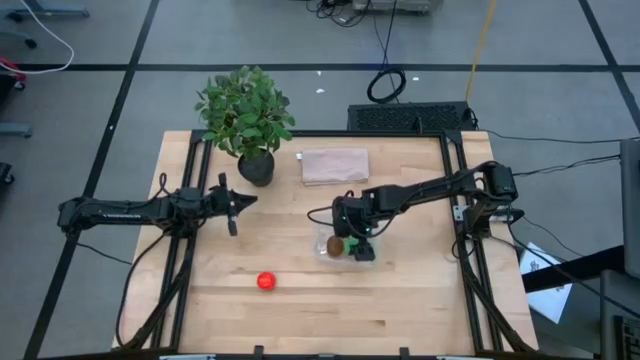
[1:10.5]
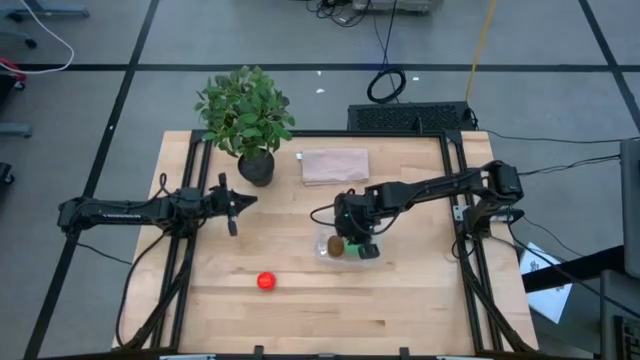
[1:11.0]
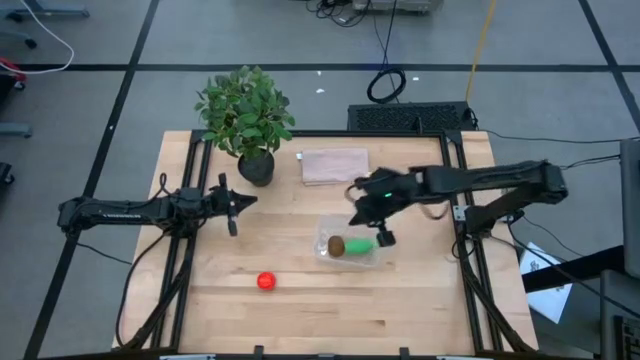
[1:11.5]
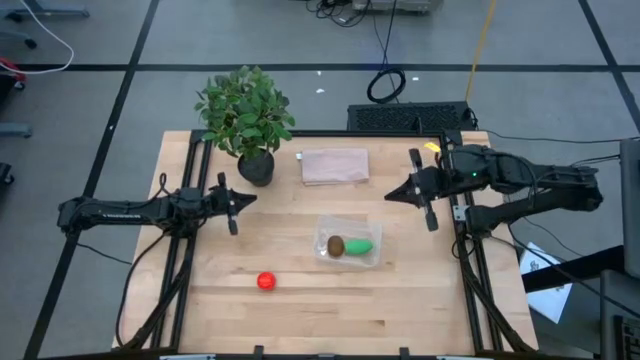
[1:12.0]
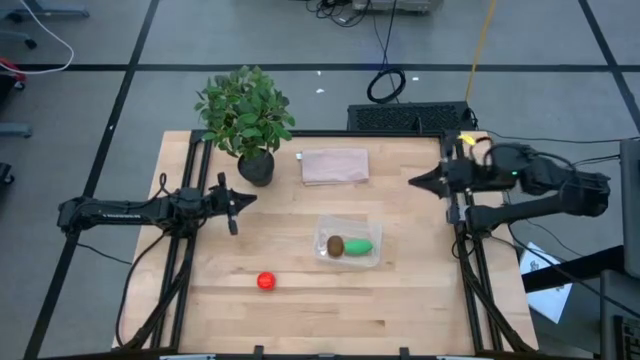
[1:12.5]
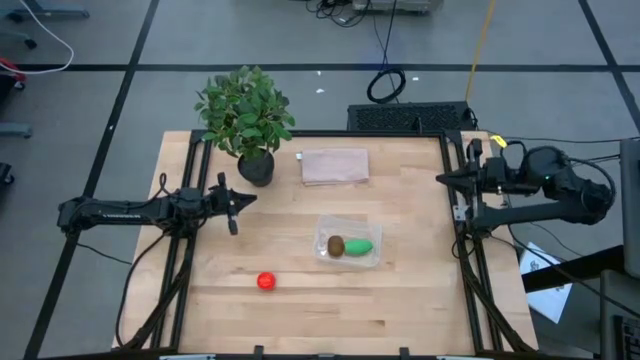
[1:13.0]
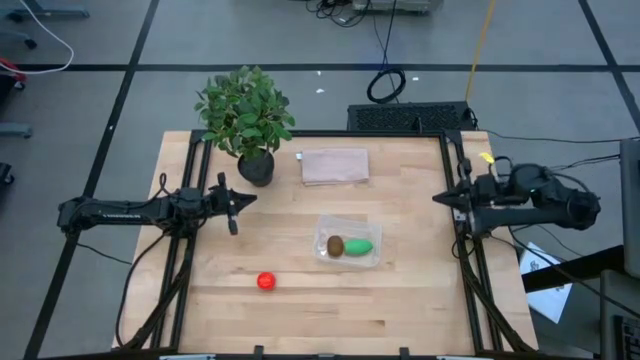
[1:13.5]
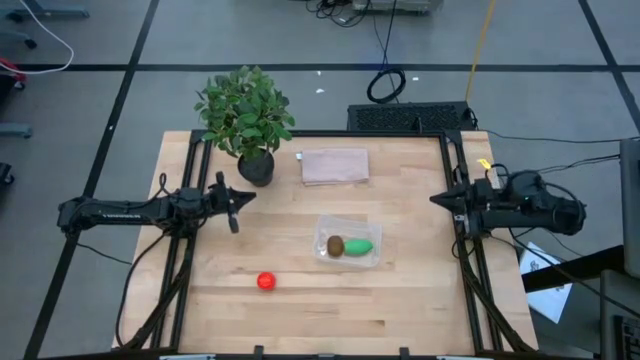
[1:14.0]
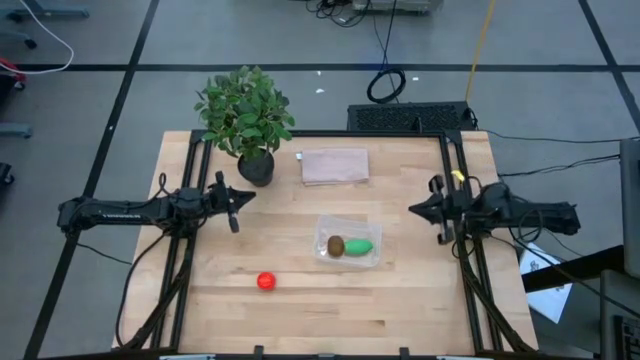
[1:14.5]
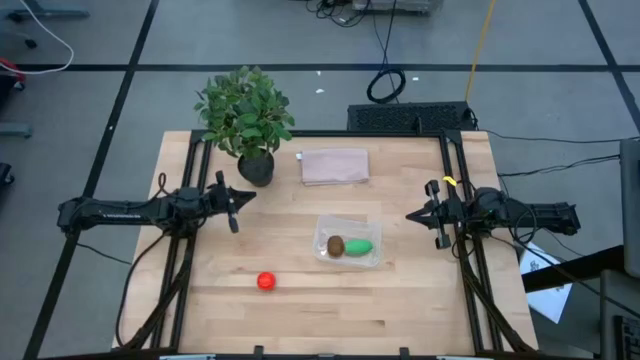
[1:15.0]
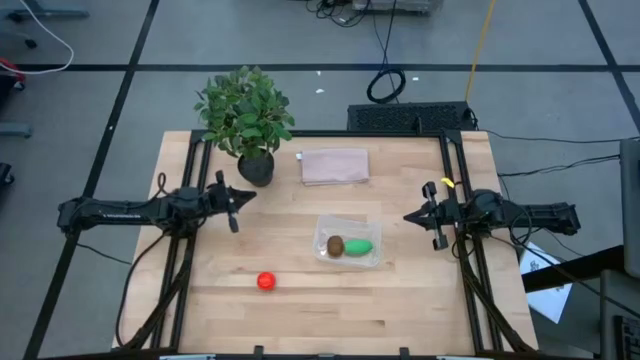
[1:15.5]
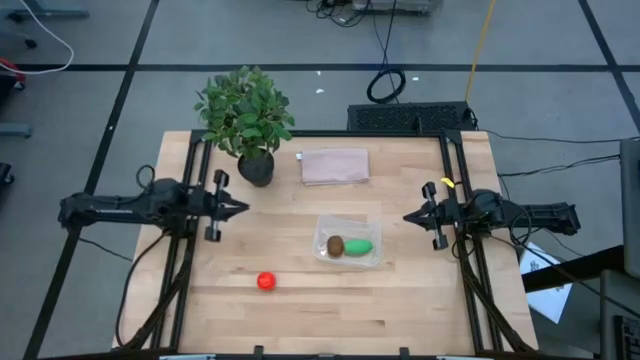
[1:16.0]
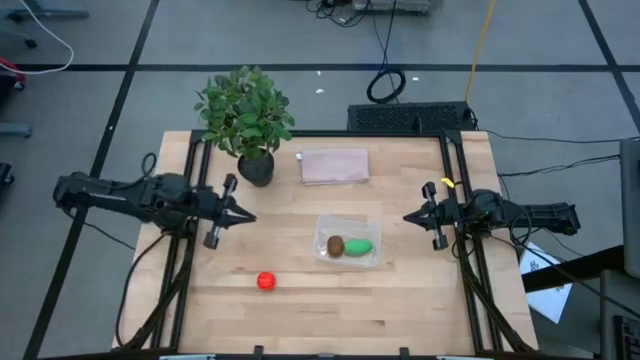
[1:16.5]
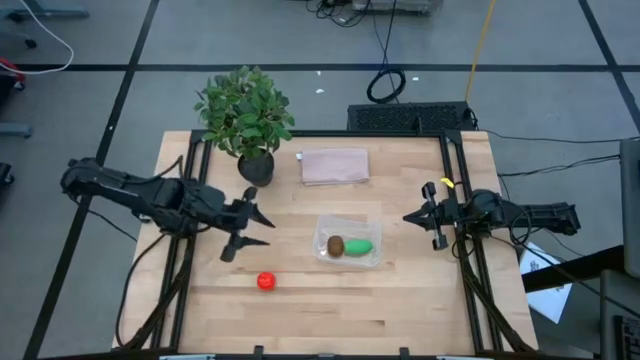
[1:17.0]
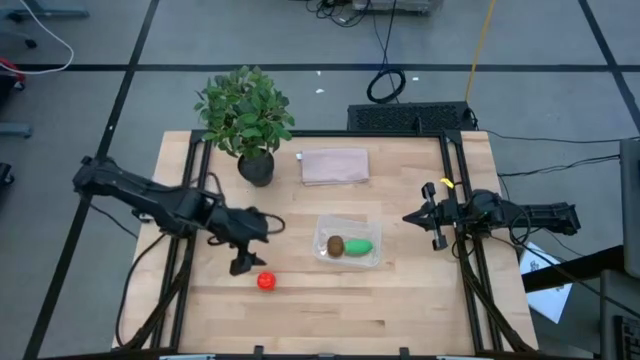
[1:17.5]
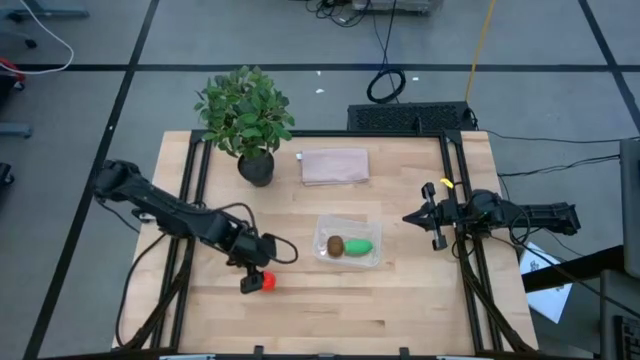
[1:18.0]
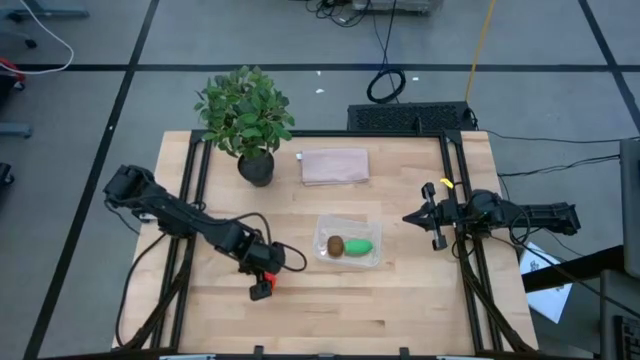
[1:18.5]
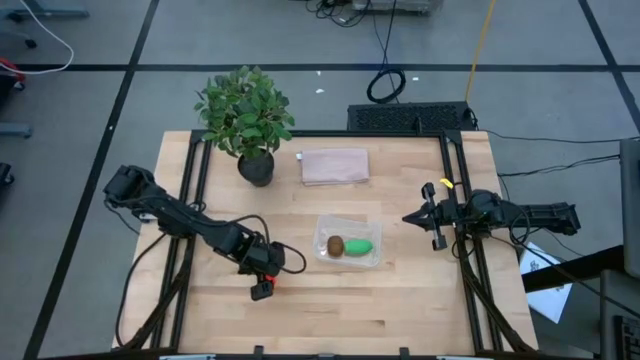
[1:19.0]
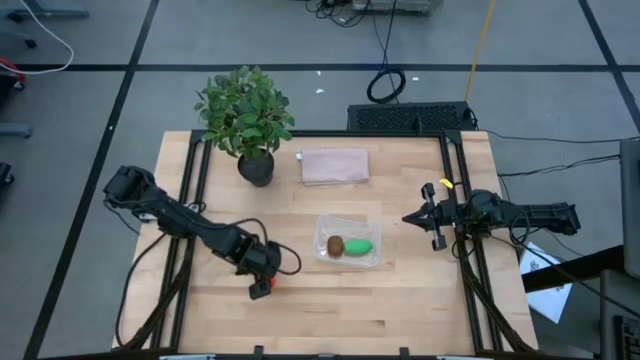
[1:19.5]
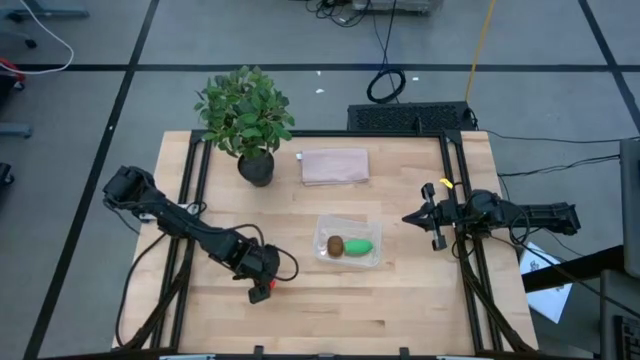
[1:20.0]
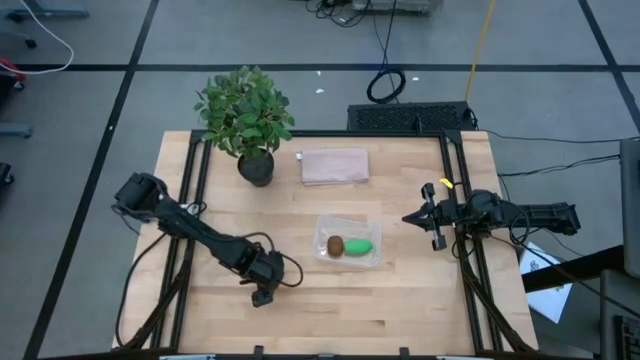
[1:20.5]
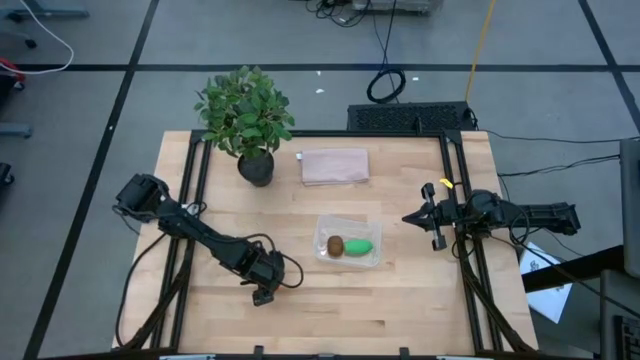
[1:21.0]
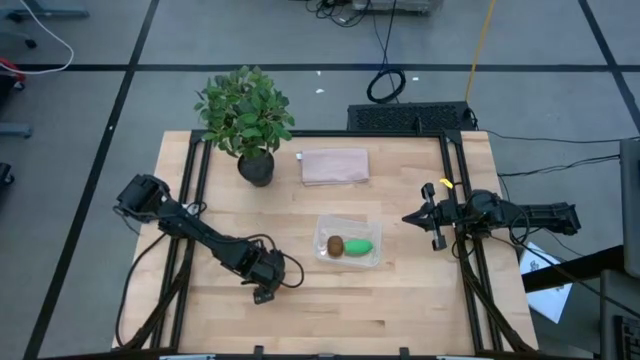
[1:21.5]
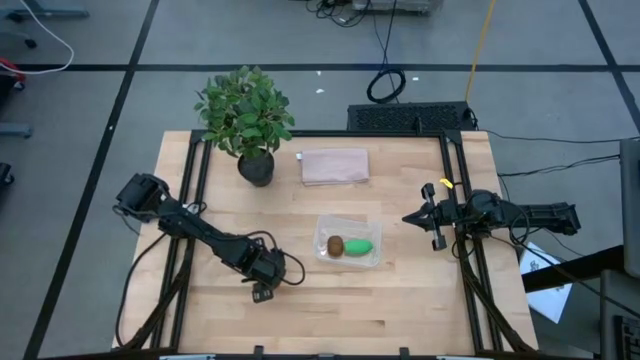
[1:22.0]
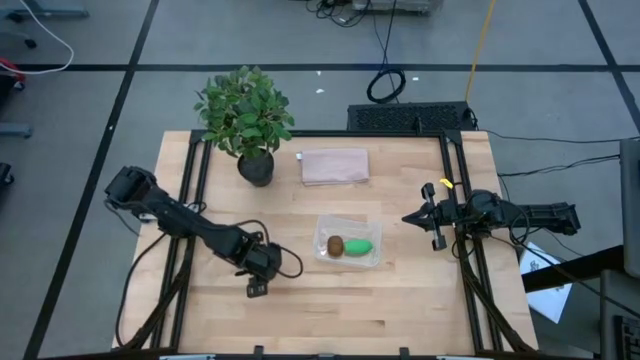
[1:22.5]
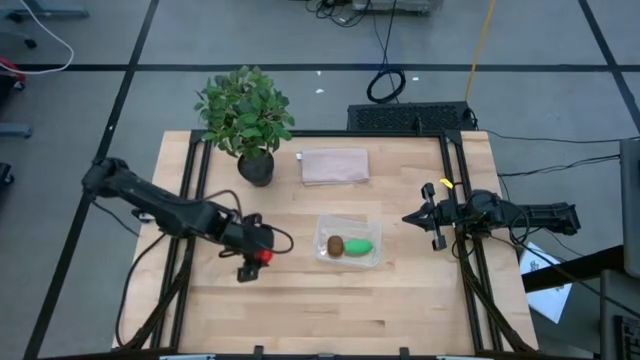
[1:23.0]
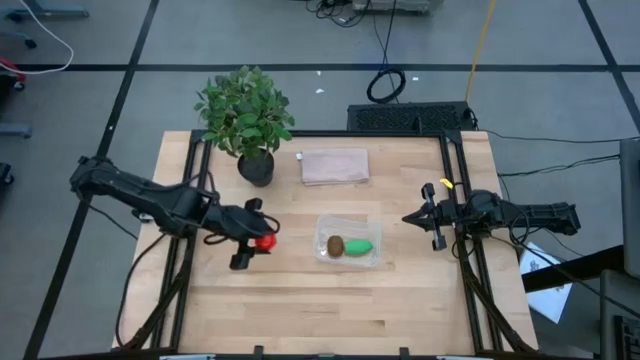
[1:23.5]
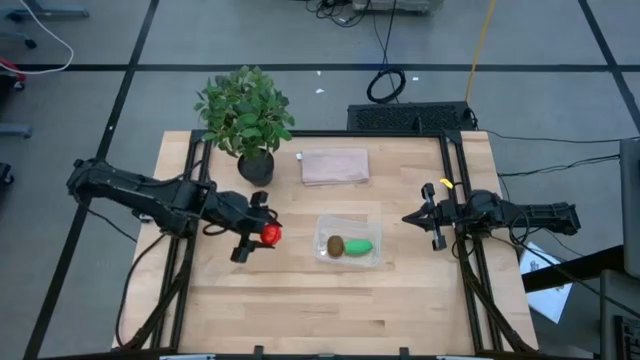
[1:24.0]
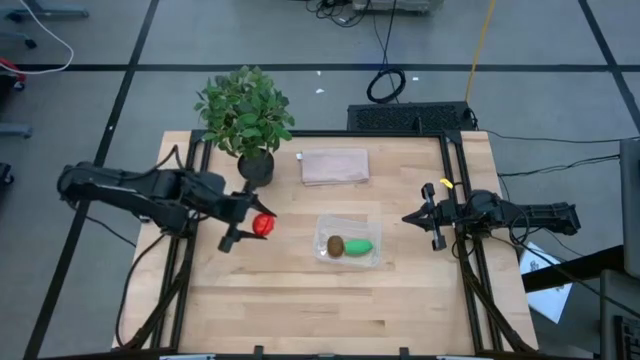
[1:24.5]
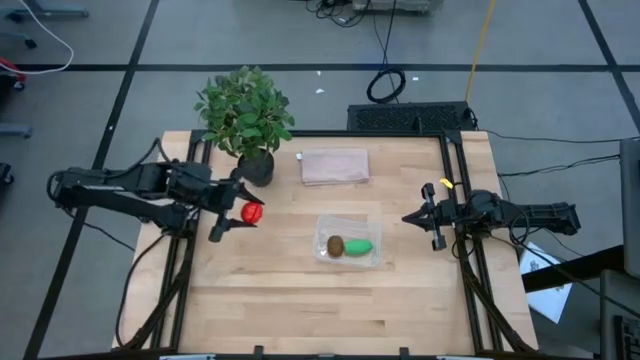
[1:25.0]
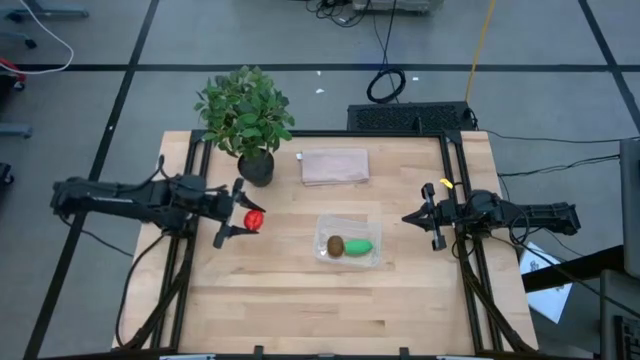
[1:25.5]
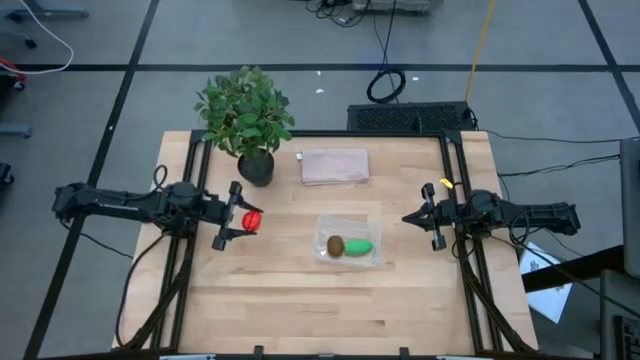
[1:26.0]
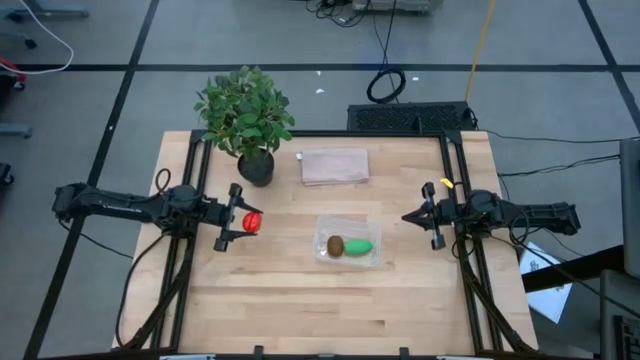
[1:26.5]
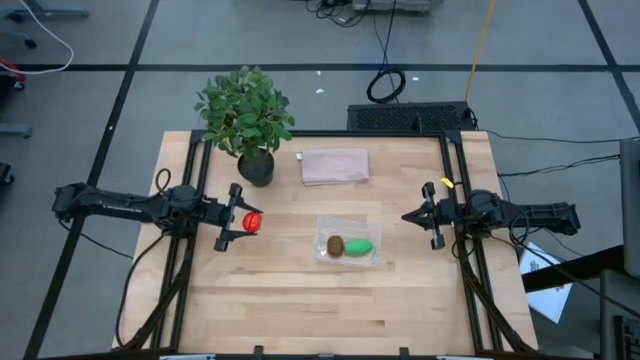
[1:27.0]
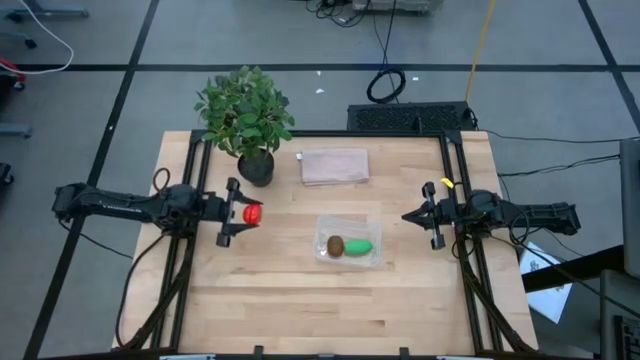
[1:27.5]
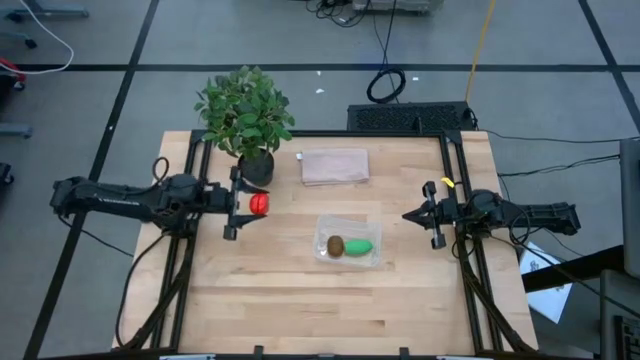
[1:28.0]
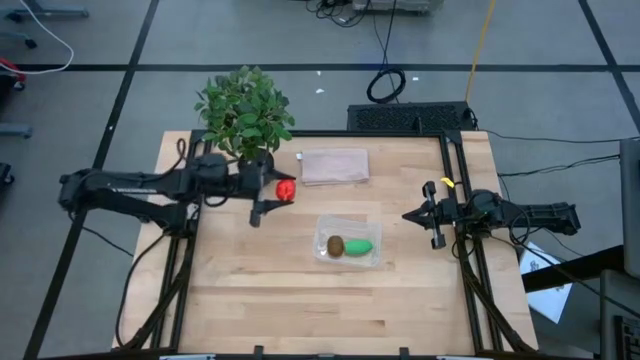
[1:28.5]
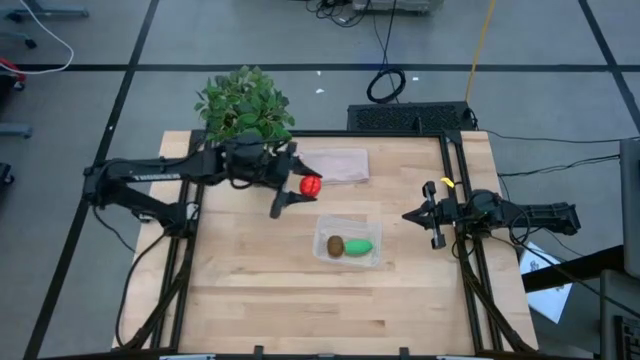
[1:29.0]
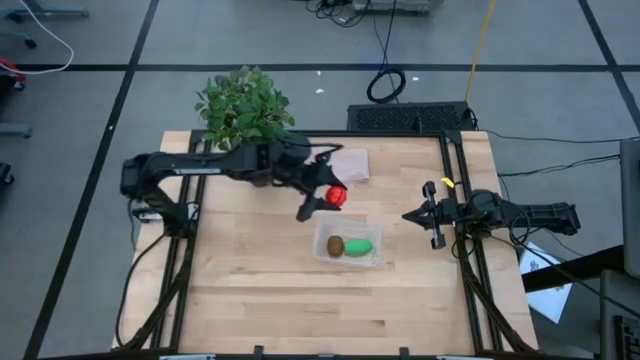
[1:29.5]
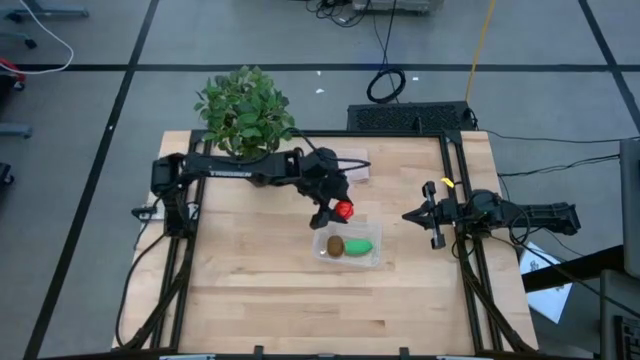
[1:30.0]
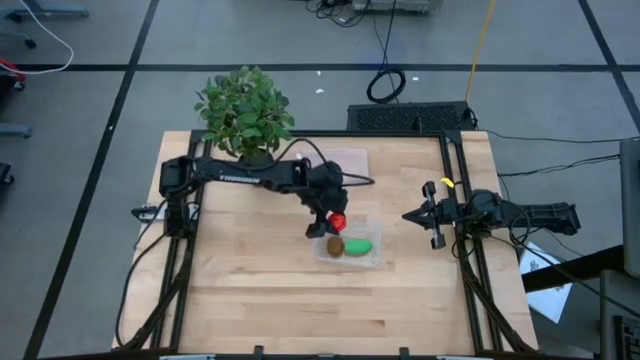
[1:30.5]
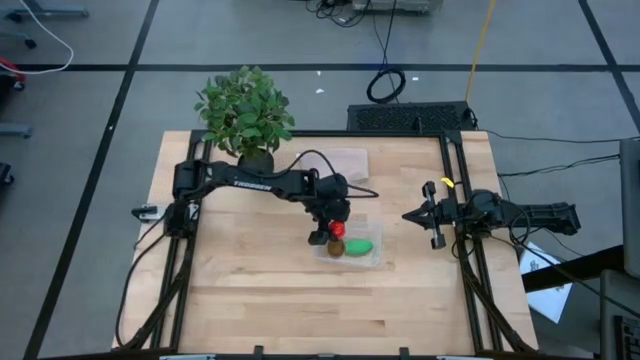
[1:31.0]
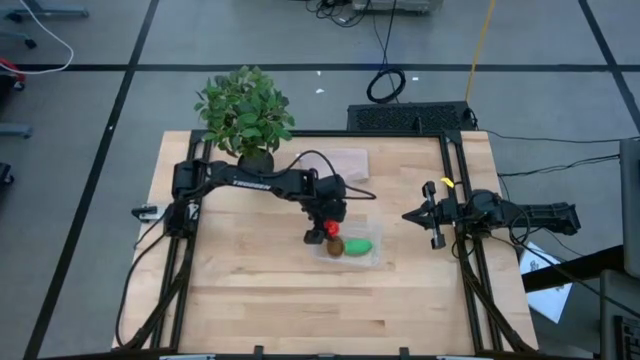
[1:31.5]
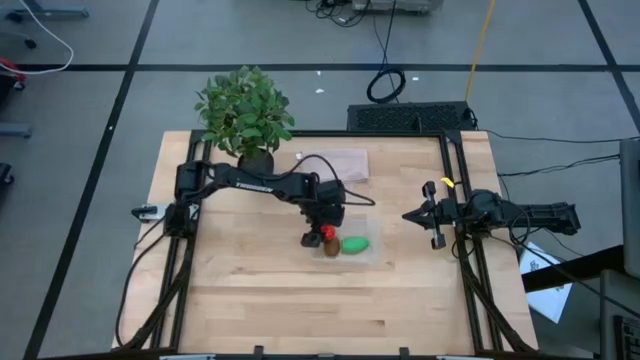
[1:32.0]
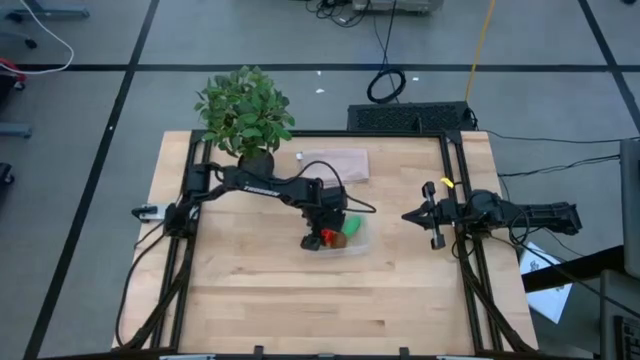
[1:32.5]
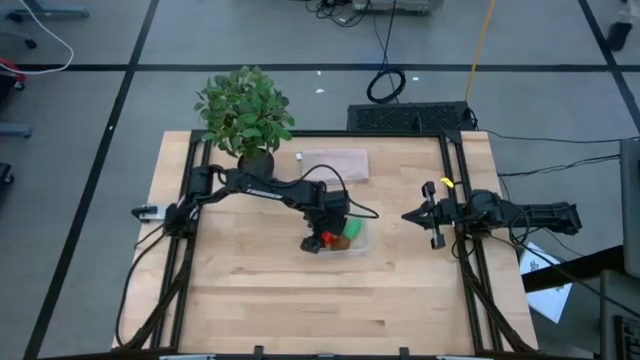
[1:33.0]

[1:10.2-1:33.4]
Task: Pick and placing Produce into tupperware
Put the red tomato into the transparent bin
